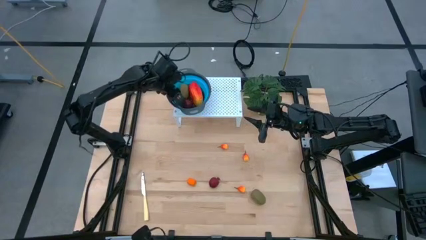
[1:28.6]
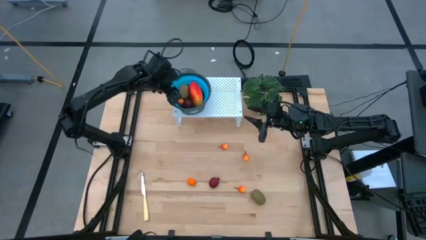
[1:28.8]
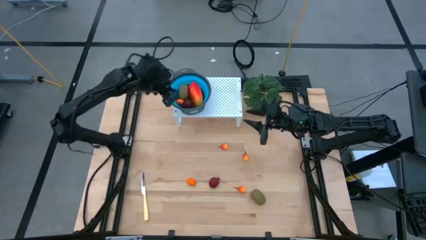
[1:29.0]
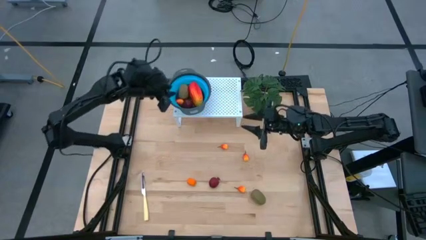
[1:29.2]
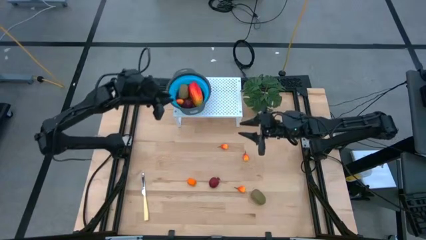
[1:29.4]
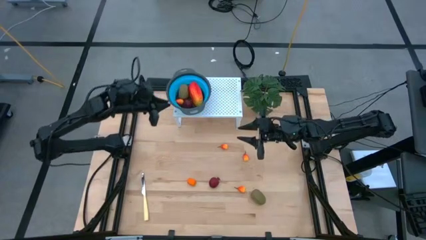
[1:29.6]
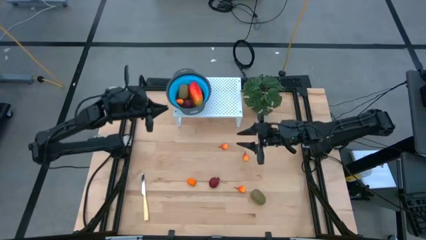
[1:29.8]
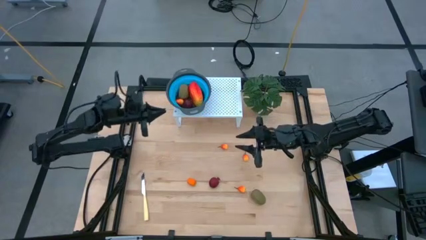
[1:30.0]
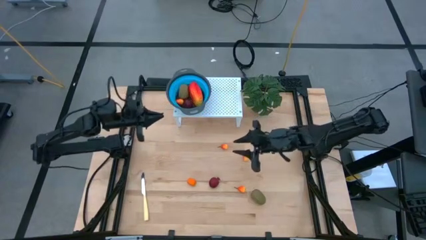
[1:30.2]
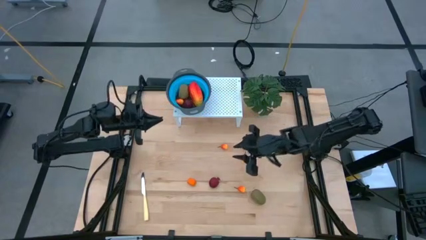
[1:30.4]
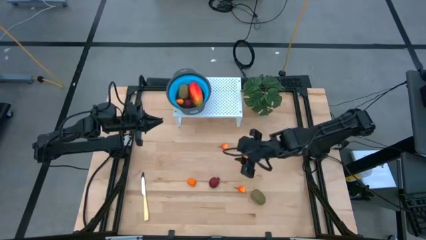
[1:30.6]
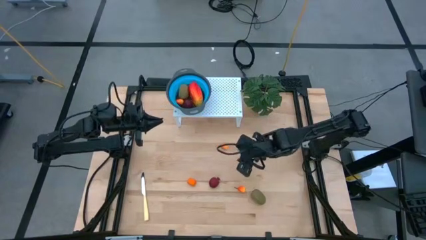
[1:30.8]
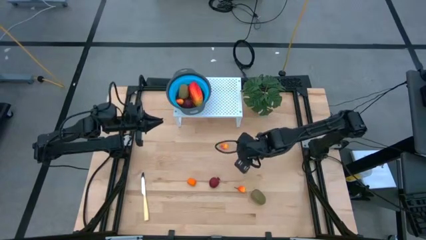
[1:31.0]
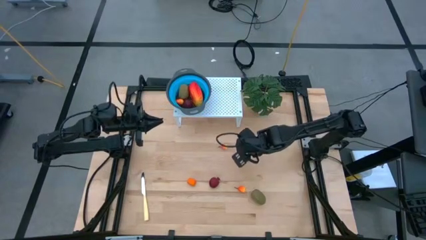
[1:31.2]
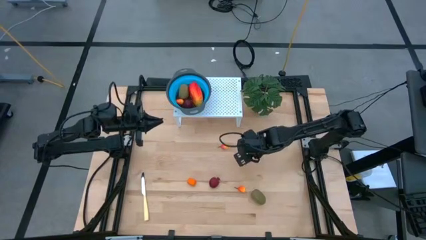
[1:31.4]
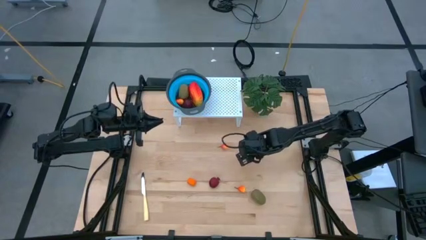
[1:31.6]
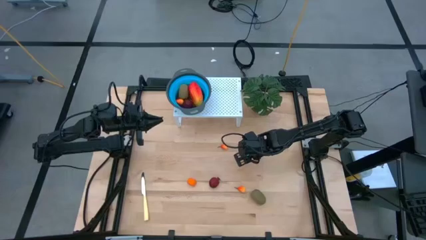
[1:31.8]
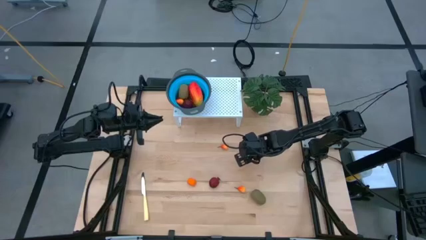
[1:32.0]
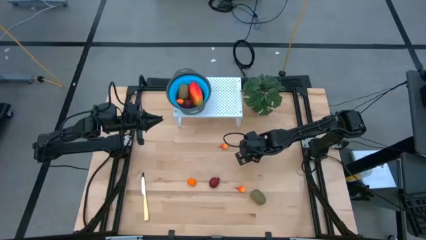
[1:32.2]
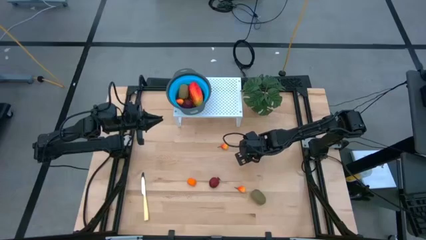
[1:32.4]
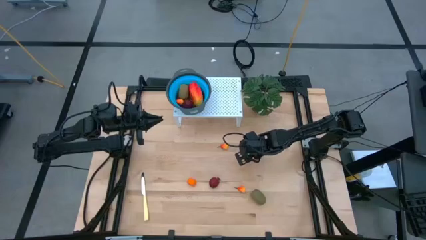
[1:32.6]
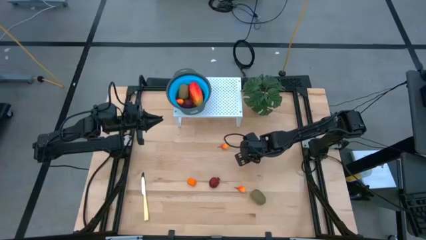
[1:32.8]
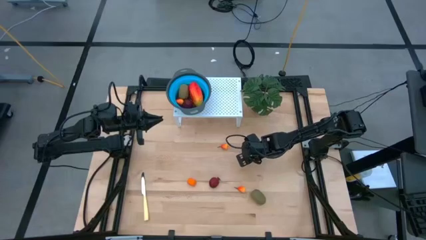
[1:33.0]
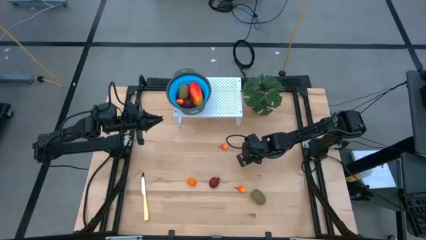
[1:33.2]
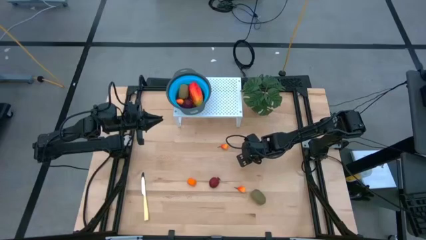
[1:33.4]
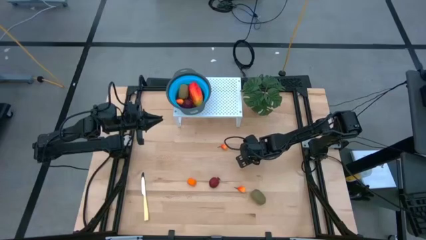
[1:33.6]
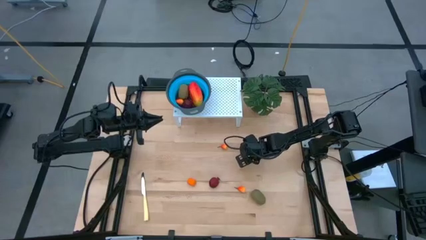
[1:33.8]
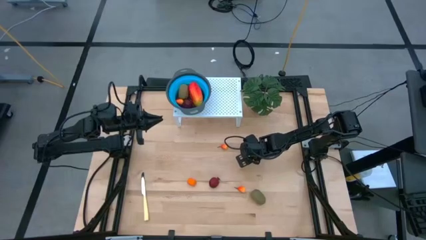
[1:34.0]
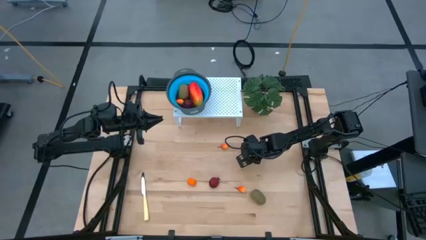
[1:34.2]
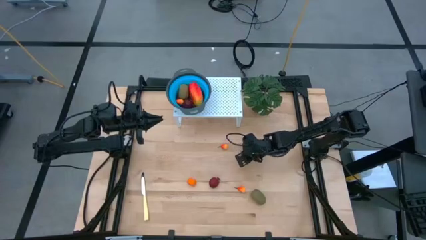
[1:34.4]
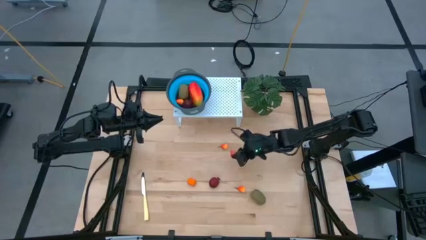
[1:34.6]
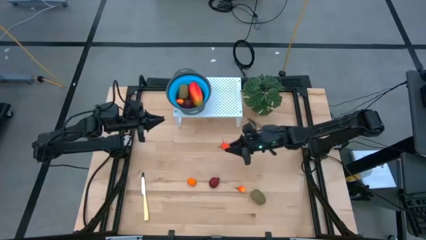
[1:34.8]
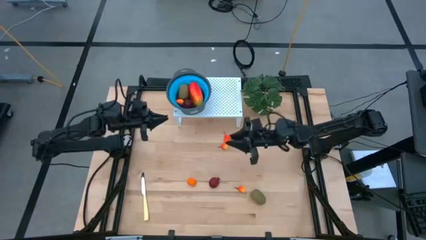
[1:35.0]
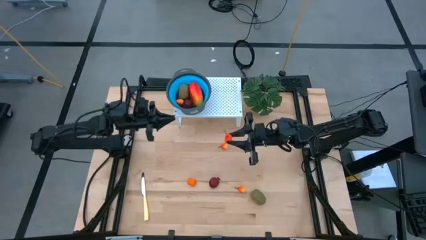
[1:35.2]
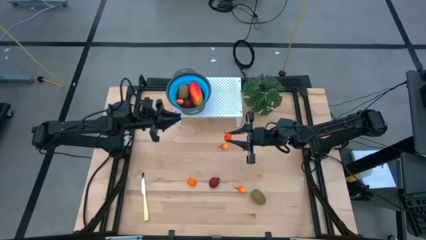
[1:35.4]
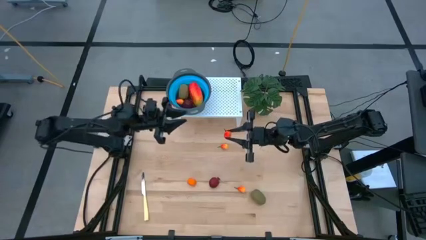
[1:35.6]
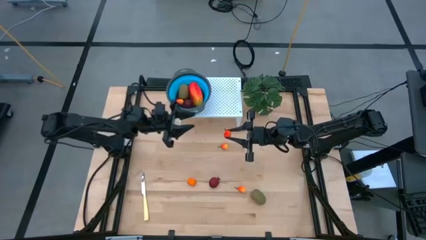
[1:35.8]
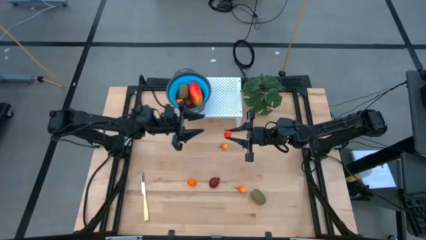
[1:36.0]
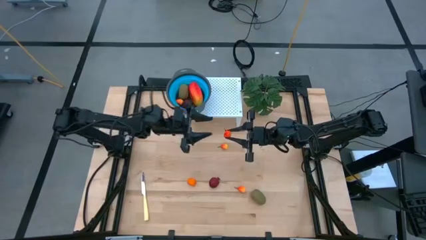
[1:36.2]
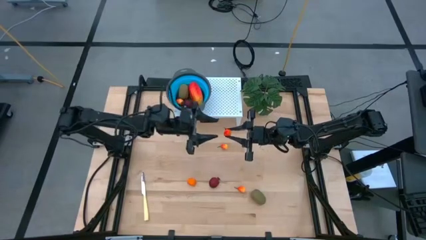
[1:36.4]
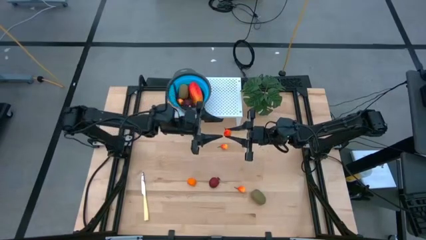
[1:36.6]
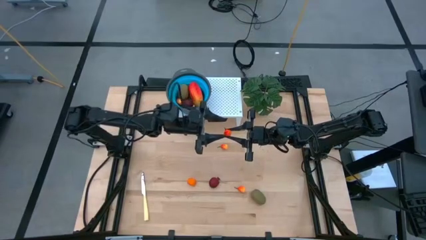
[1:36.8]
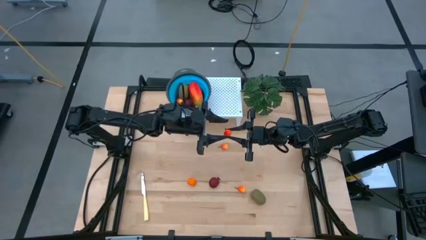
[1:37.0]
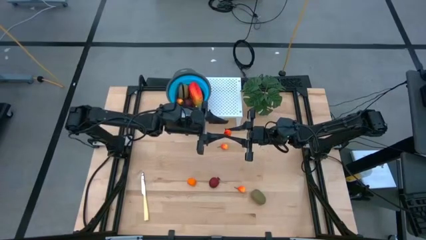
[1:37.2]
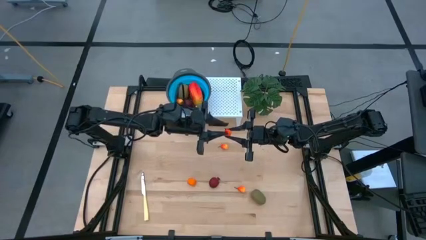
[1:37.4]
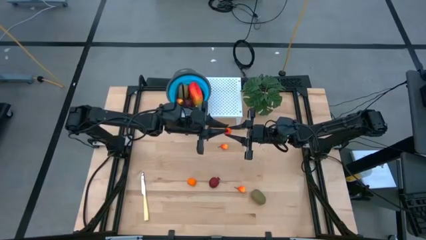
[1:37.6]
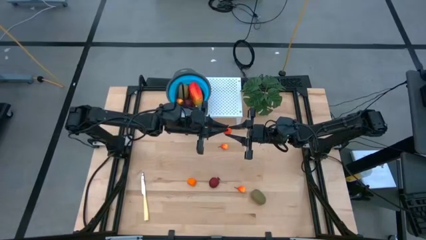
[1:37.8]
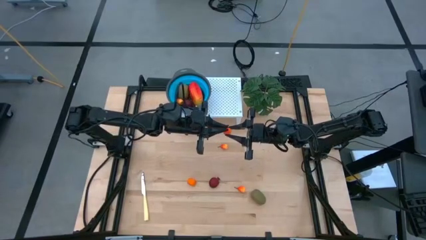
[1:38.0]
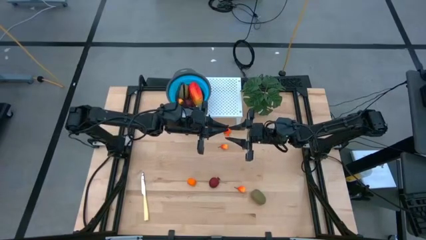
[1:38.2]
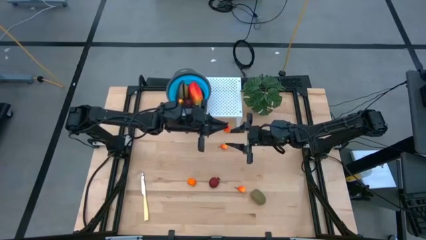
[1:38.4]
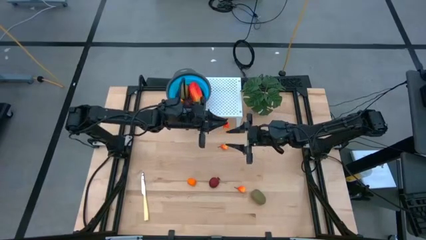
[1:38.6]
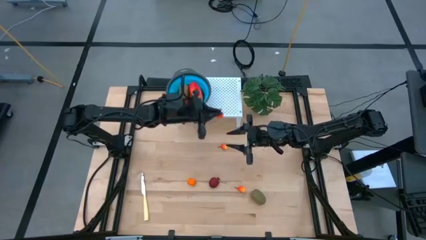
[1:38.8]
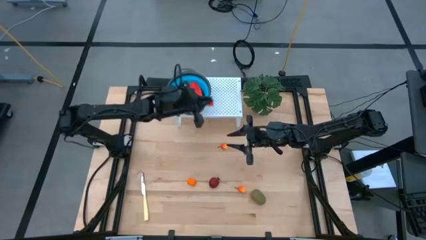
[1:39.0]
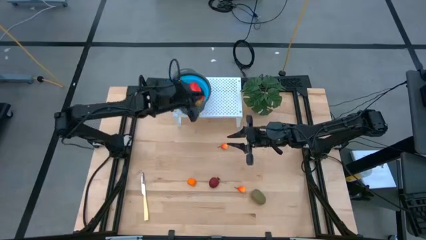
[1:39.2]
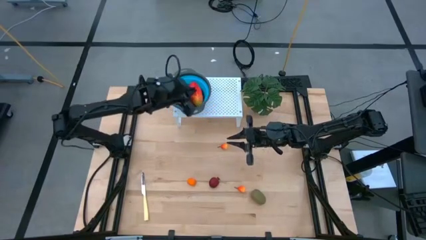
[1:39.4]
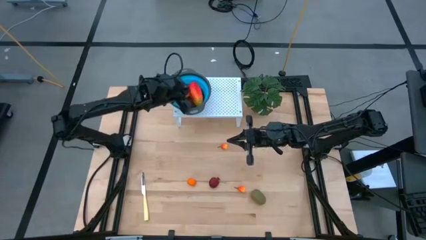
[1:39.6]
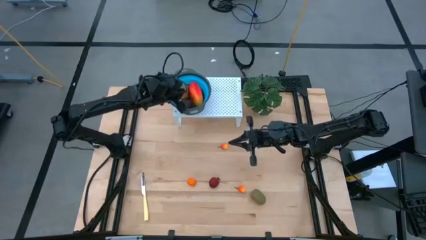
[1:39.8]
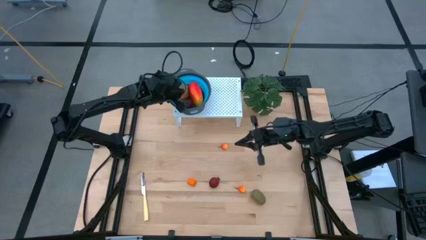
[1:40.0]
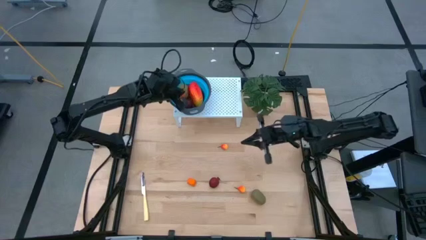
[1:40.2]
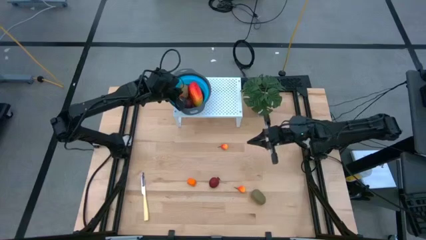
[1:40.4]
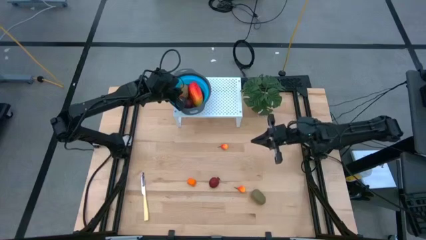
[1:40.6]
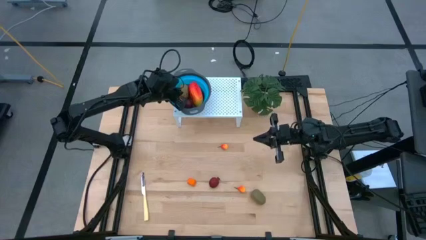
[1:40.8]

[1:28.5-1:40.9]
Task: Pick & Place Fruit
Put the peach in the blue strainer bowl on the shelf

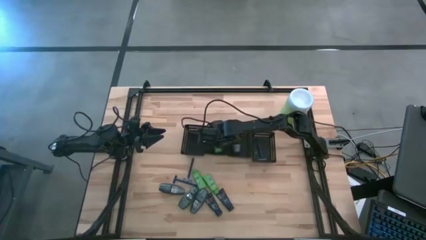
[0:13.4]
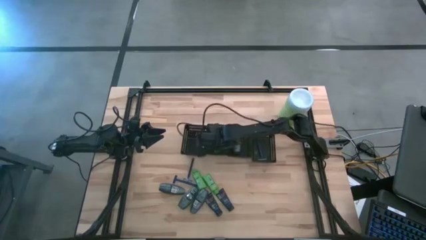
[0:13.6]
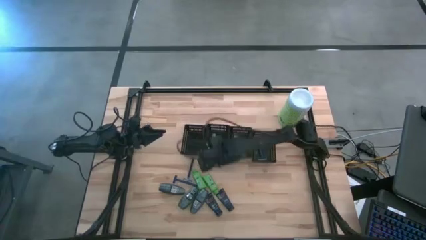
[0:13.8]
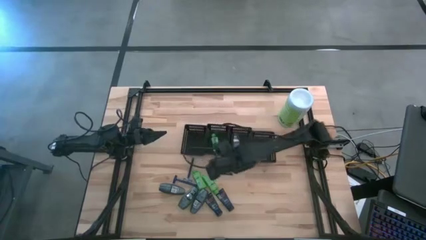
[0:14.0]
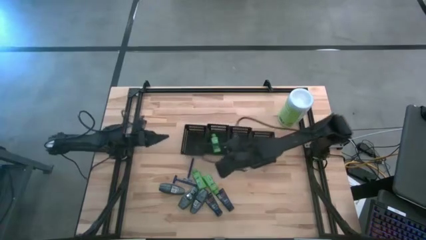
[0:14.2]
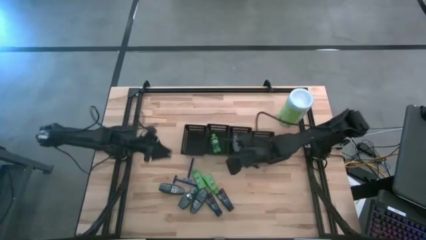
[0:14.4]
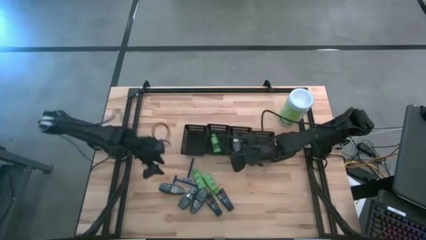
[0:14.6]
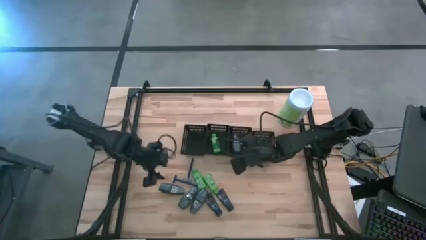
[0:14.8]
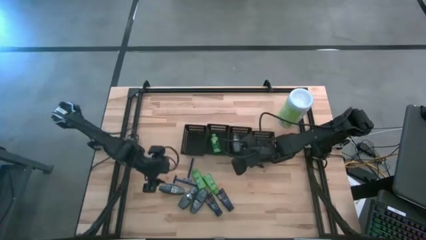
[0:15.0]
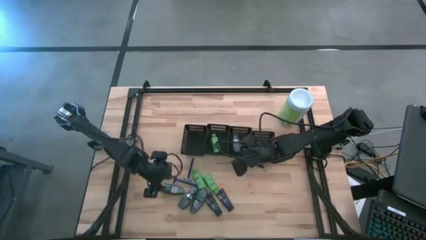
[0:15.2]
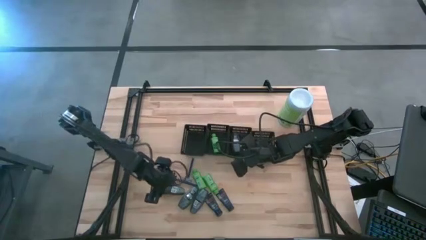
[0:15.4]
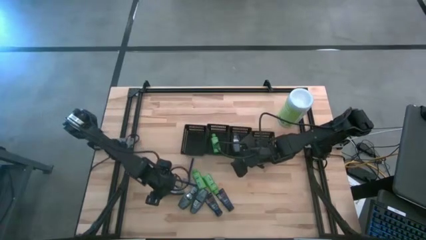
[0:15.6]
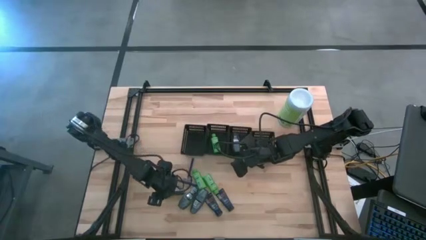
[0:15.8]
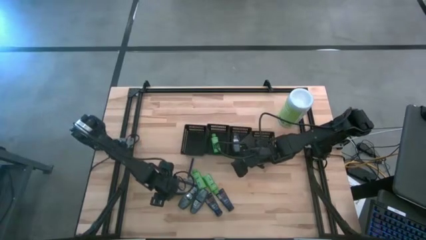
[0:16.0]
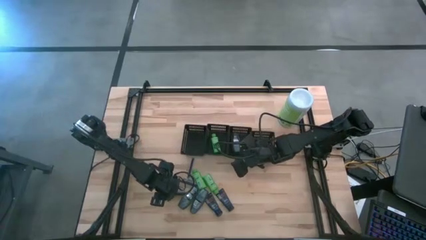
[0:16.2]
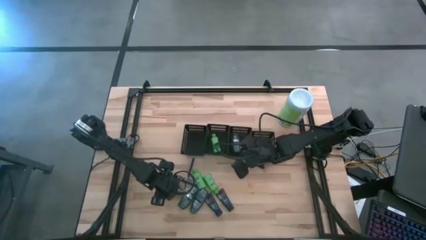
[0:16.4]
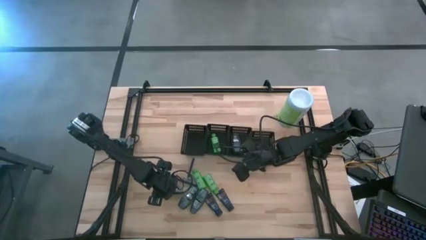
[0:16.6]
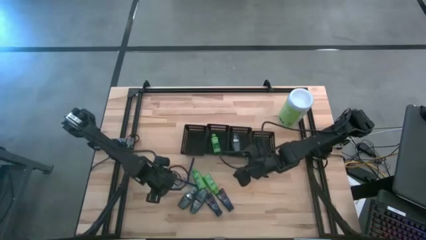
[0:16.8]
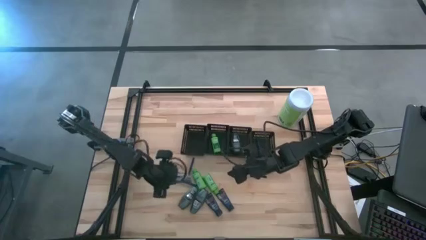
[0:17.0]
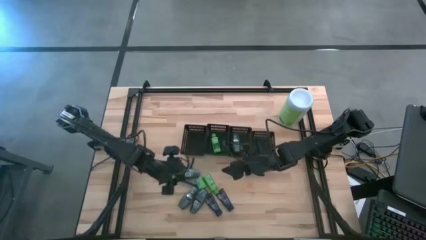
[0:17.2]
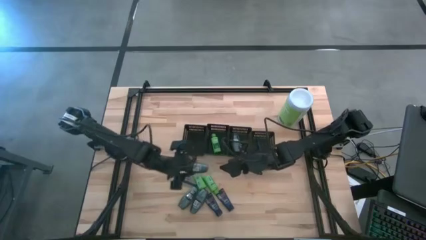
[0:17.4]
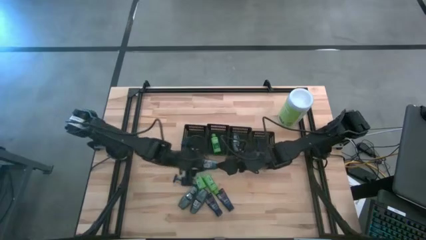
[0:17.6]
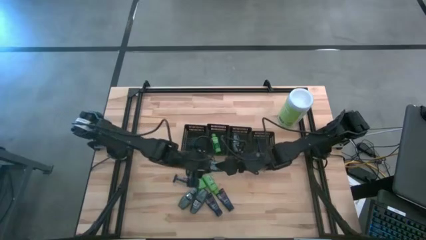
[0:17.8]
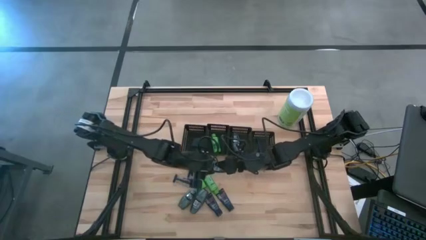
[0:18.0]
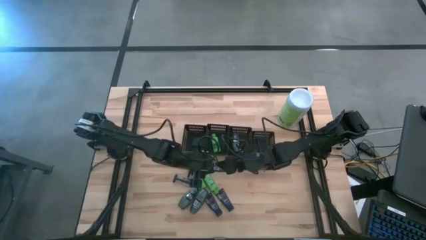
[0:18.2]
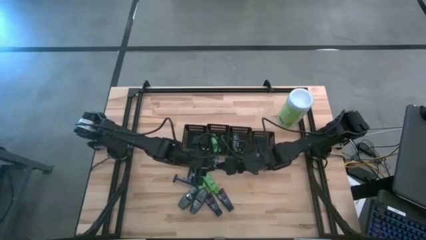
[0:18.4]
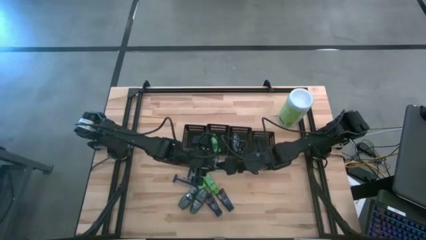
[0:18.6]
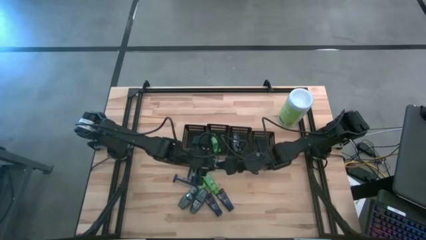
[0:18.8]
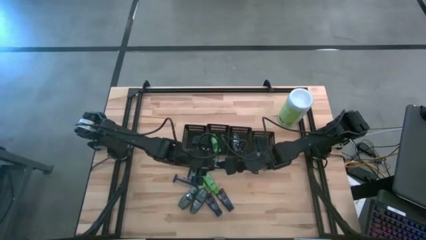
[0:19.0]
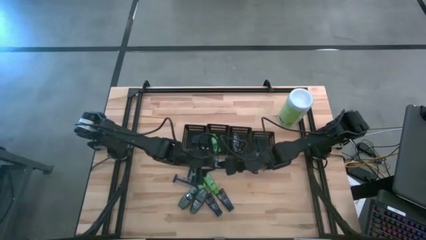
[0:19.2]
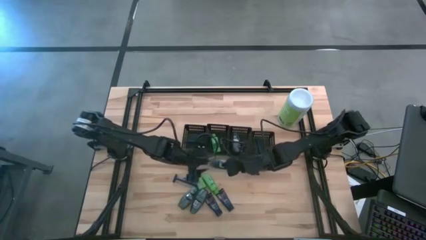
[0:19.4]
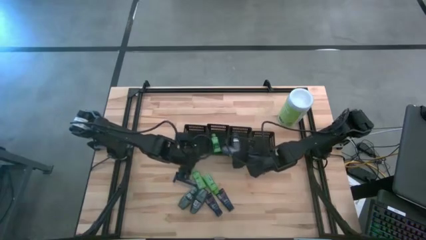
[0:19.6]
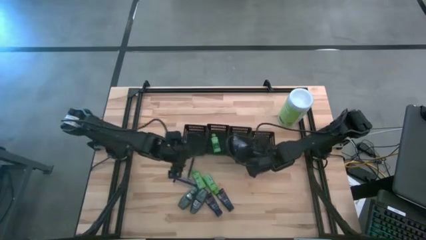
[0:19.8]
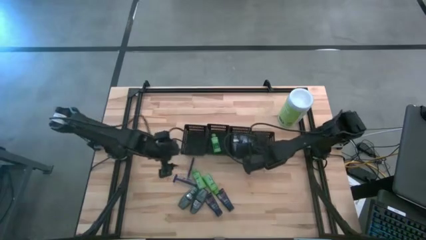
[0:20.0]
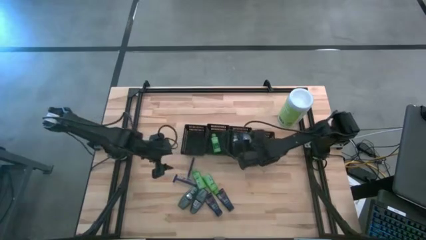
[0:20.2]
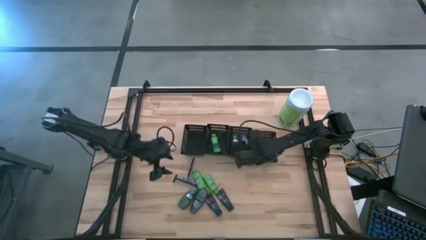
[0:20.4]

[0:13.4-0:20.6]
Task: Pick & Place Travel size toiletries
Put the deodorant into the middle right black bin
